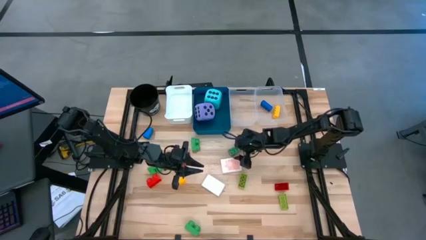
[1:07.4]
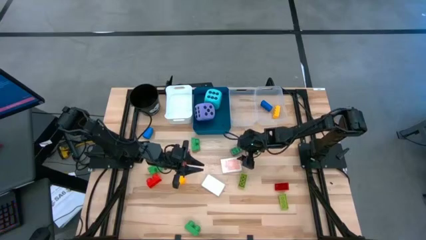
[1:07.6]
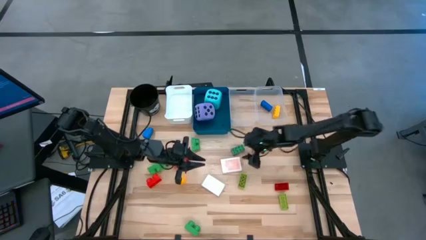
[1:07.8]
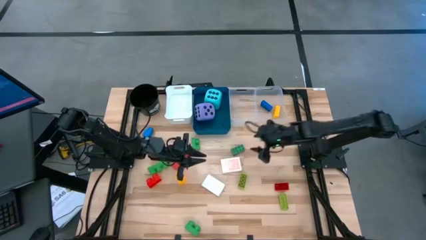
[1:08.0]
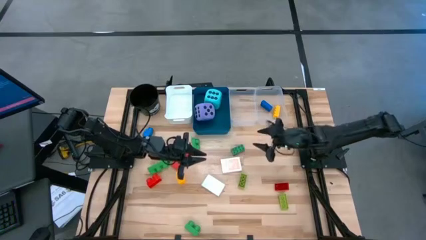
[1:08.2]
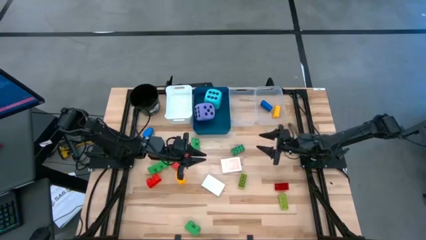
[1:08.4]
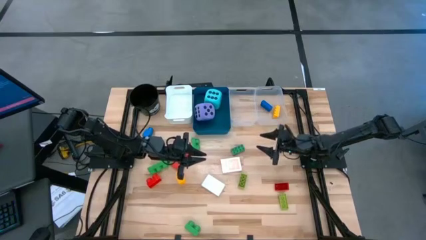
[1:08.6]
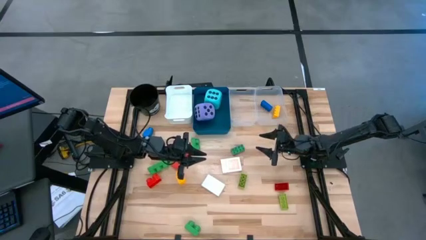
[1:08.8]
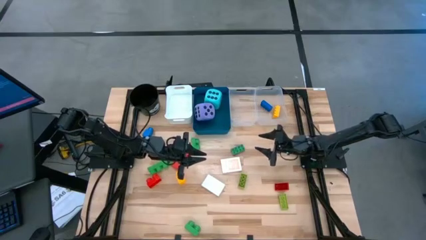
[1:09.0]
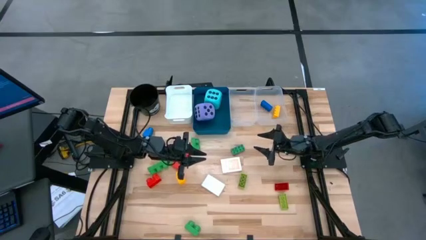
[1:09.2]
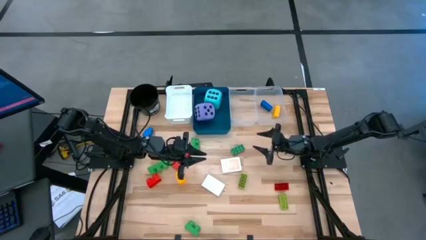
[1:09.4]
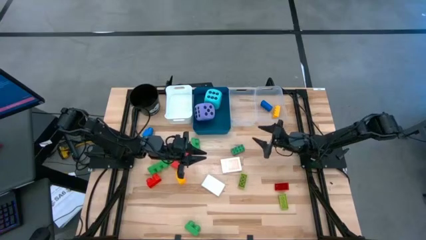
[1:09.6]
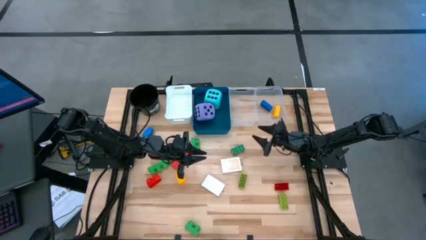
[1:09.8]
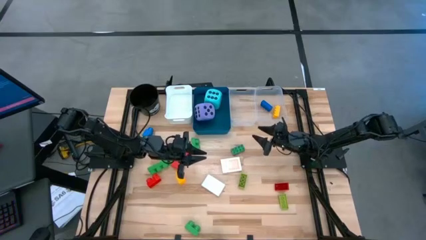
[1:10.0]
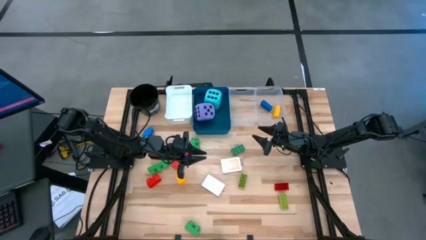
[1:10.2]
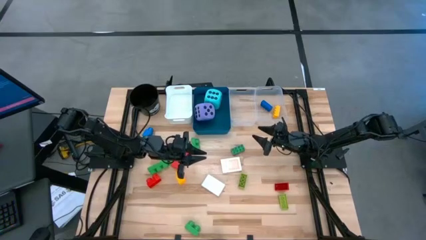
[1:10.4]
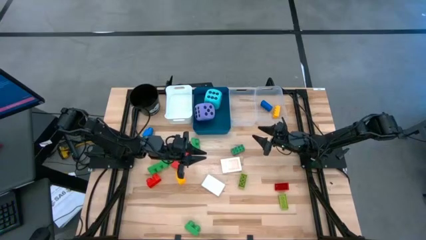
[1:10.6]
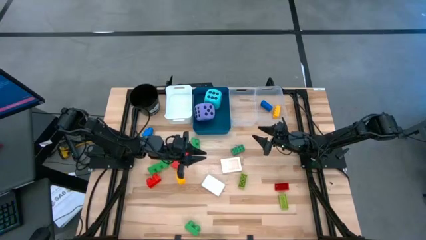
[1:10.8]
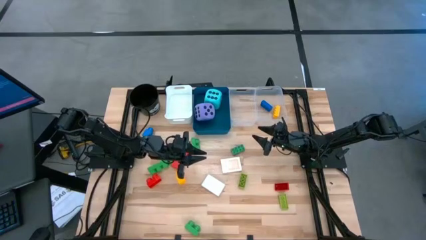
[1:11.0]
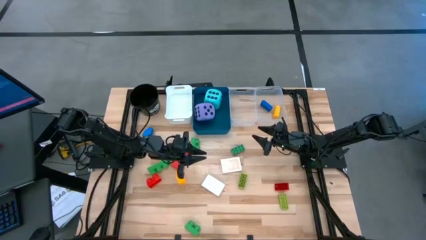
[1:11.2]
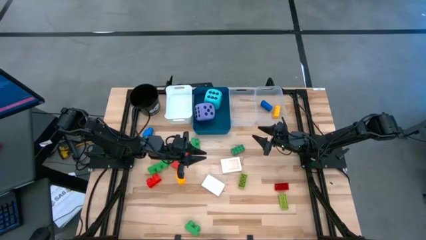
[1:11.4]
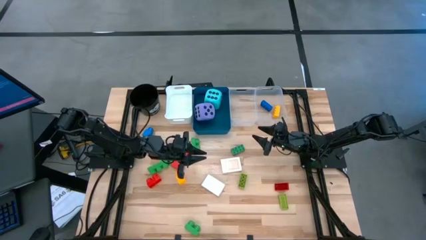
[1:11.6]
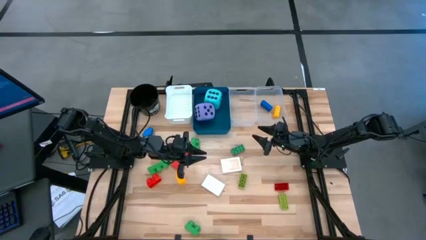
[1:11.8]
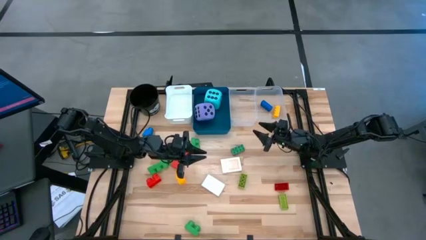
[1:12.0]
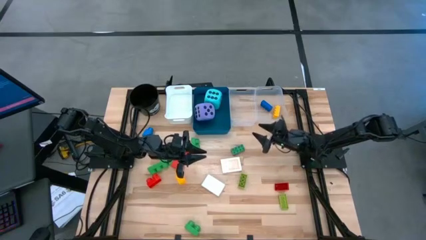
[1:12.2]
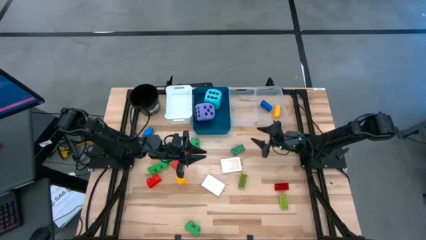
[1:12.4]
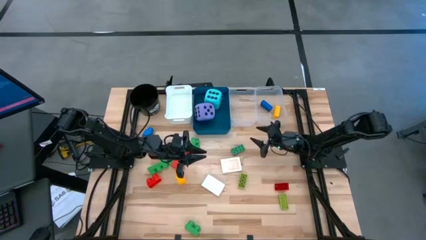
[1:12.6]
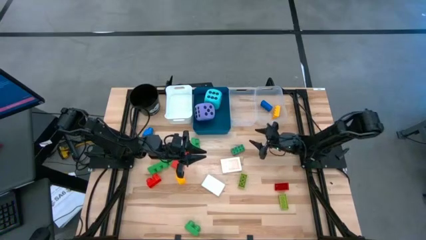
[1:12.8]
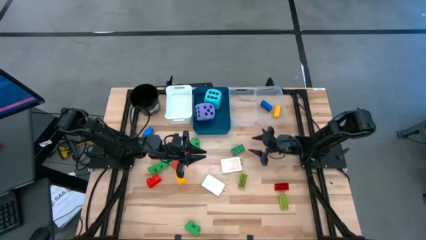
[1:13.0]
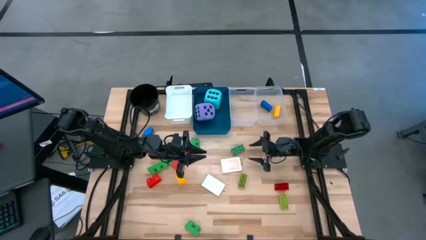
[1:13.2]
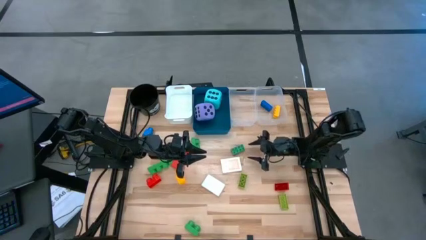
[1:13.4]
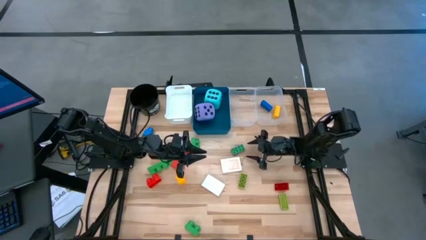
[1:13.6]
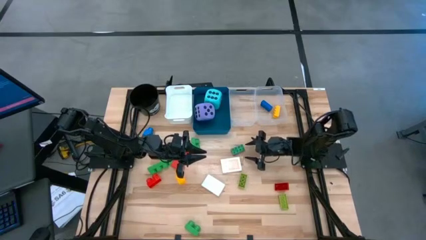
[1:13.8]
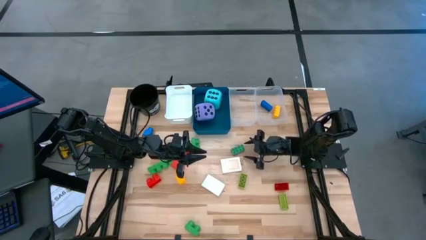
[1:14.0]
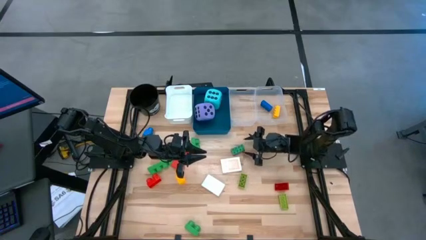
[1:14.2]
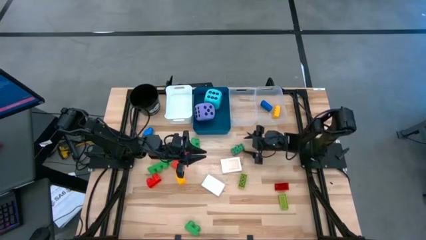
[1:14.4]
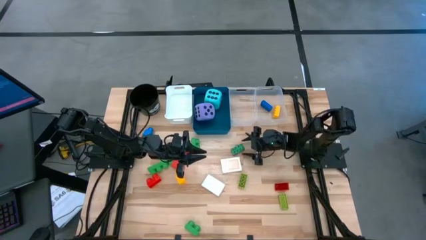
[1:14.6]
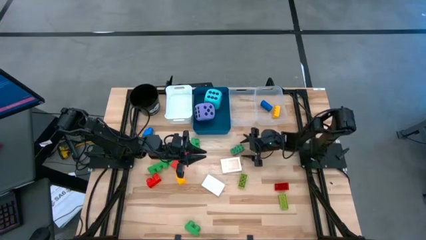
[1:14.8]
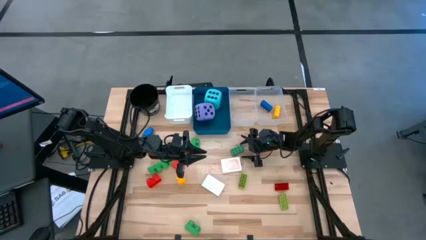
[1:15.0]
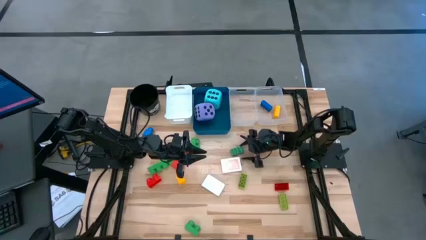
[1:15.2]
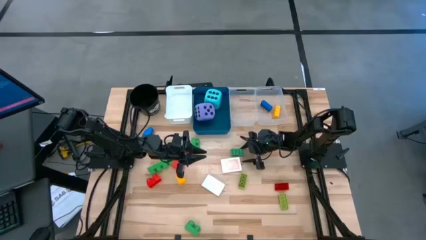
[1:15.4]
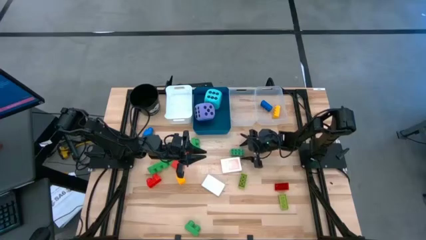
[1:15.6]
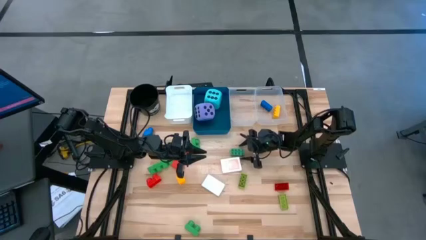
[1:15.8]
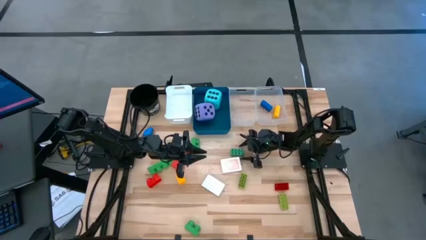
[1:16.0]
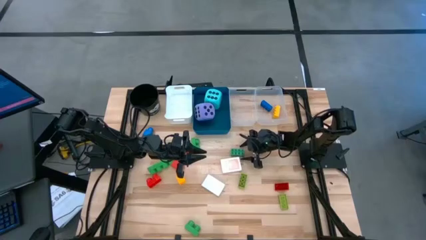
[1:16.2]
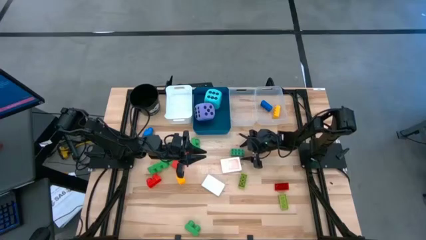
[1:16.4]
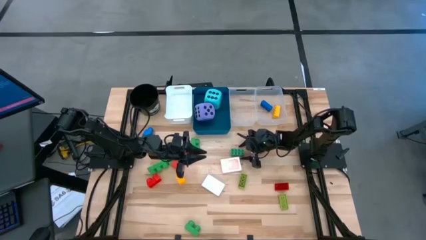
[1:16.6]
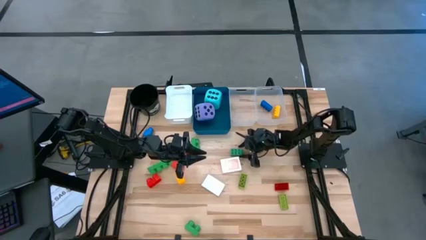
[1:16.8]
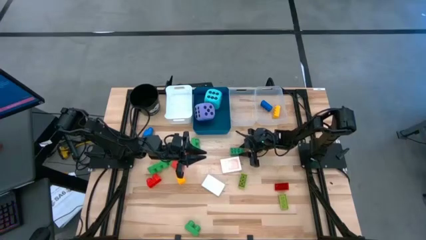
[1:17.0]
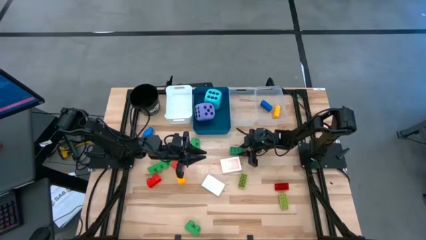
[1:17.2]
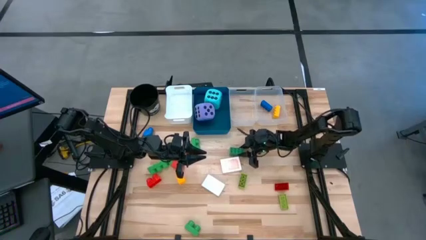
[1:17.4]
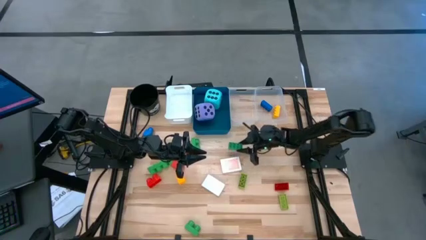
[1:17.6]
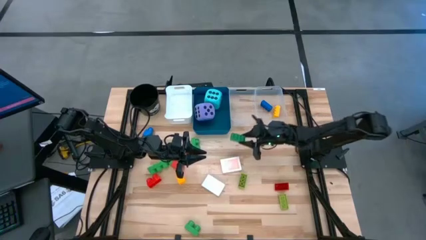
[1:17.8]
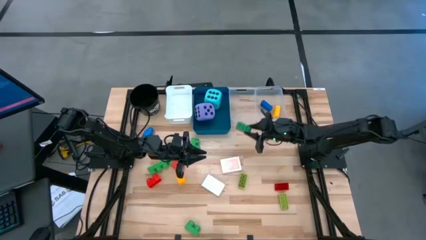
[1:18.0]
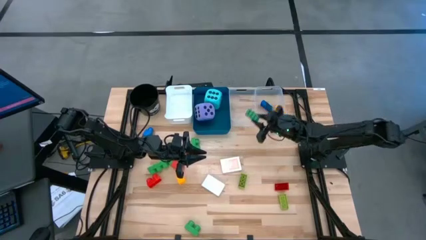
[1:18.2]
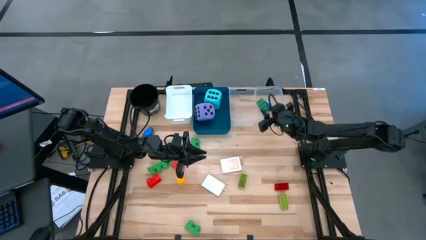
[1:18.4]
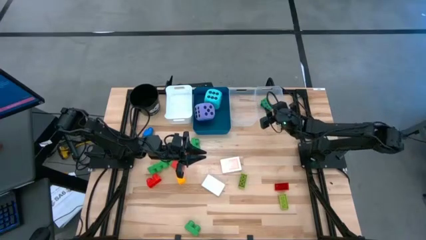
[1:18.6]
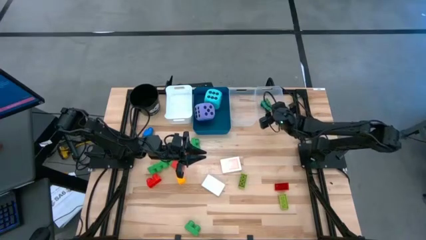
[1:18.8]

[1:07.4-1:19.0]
Task: Pick & Place Toys
Put the small green game piece into the right transparent bin

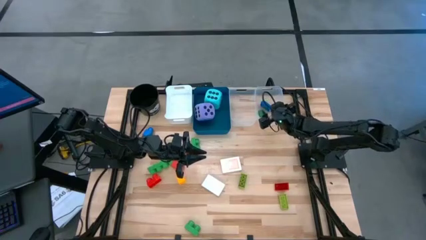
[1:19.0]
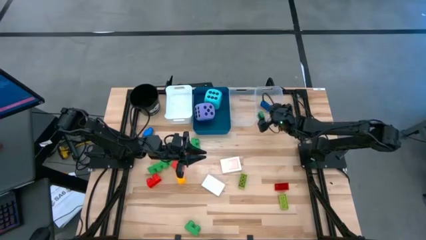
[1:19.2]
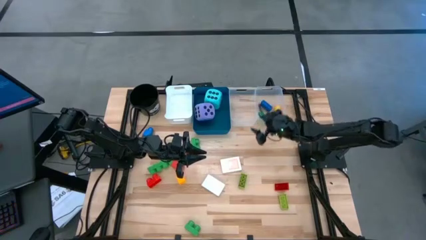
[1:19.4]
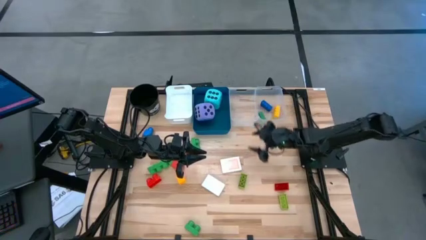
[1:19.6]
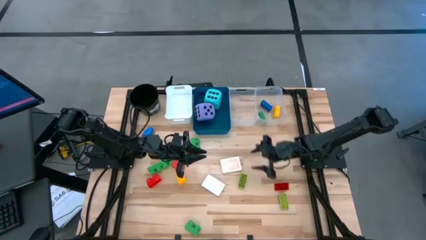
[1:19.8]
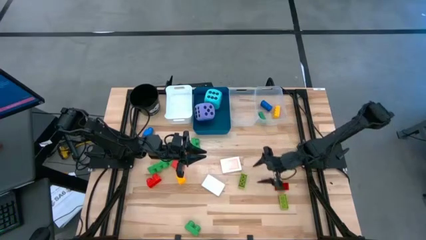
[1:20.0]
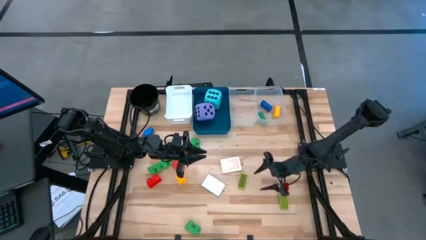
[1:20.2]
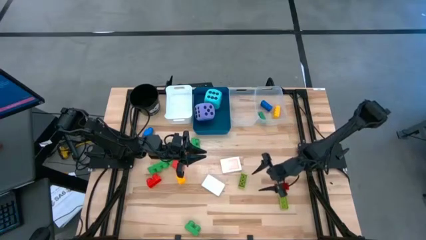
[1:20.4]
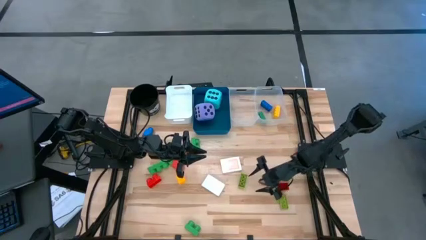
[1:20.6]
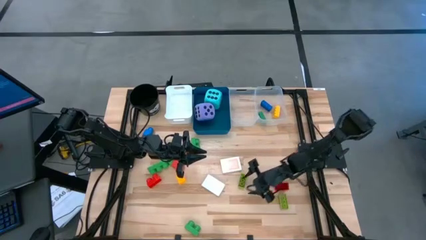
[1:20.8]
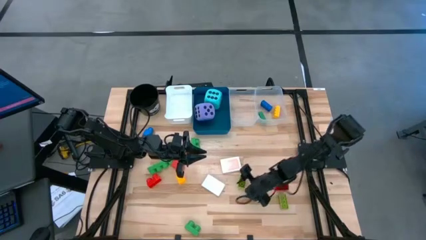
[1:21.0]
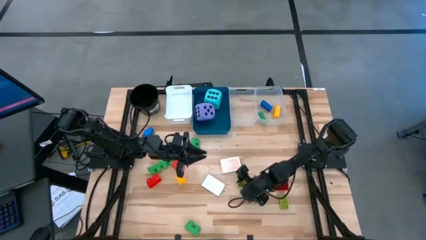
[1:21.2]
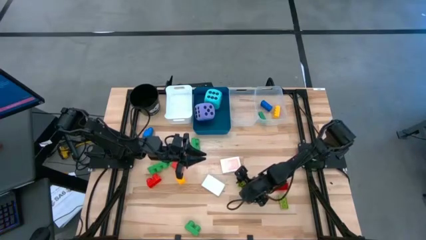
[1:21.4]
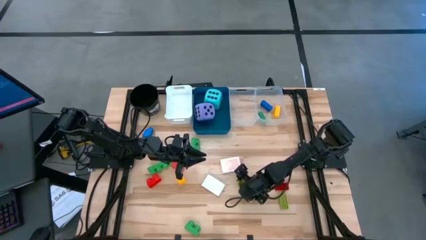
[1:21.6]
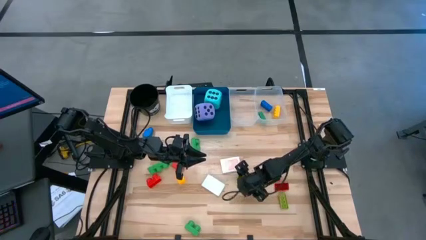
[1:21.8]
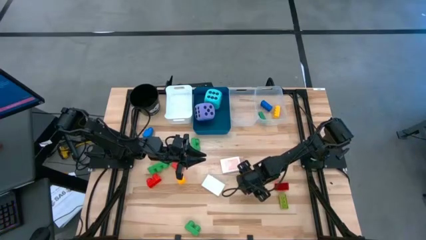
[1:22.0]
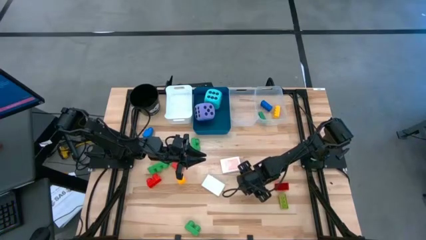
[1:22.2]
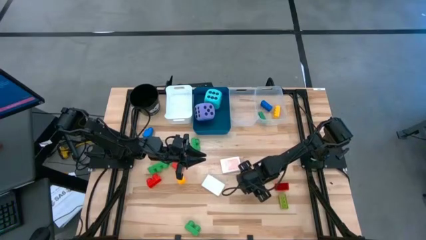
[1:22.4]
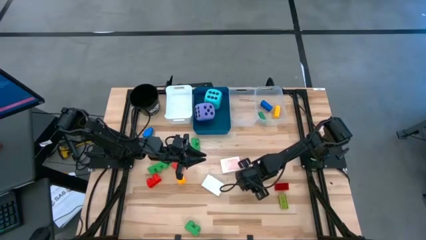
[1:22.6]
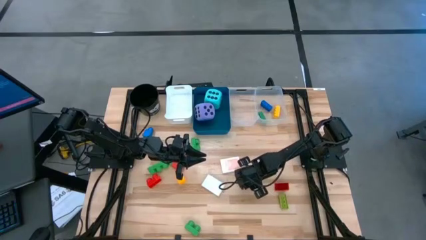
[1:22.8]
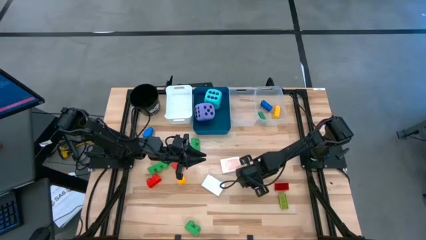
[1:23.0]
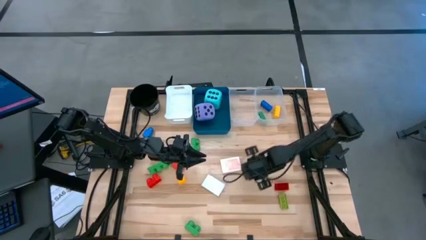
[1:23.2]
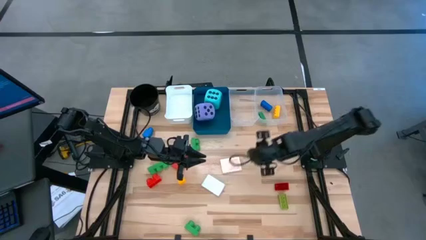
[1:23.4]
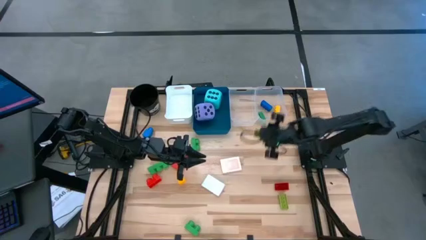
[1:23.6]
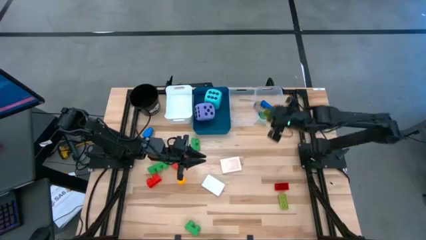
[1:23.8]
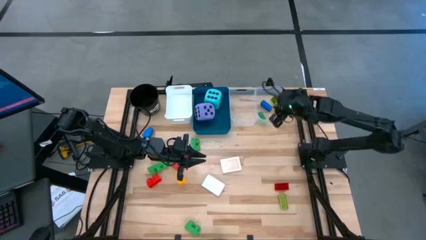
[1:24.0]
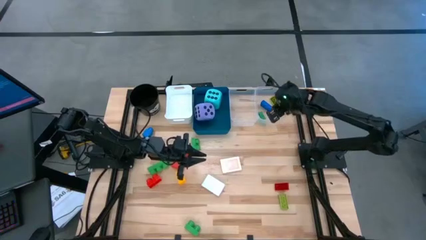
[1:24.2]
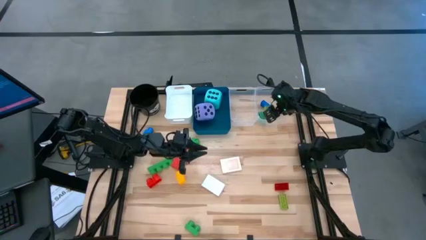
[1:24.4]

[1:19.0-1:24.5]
Put the top small yellow and green game piece into the right transparent bin
